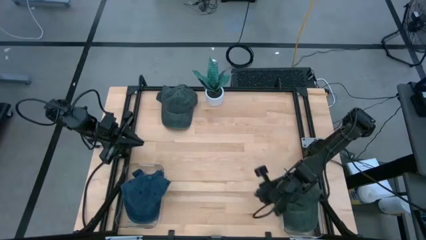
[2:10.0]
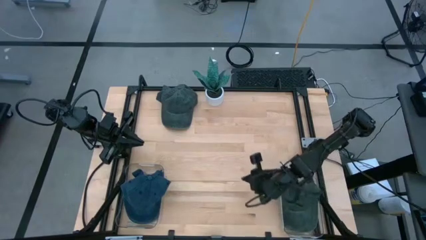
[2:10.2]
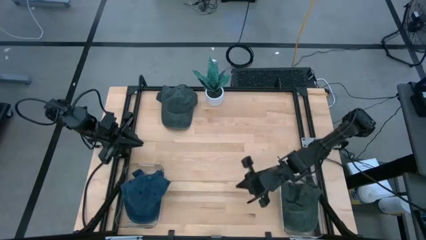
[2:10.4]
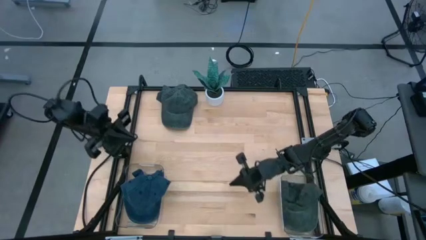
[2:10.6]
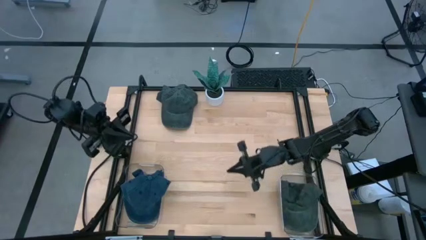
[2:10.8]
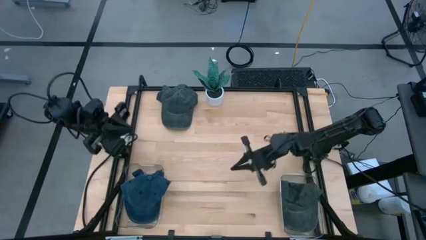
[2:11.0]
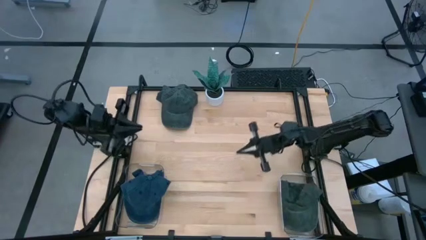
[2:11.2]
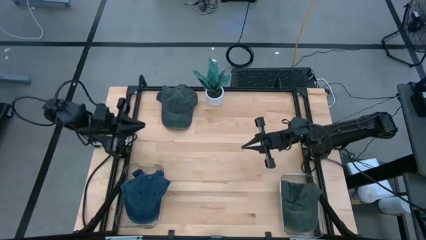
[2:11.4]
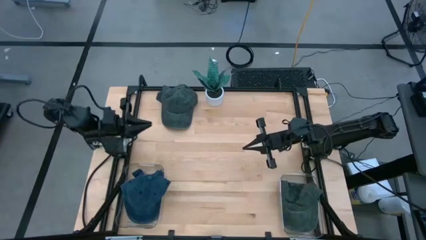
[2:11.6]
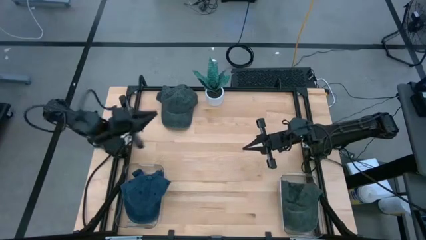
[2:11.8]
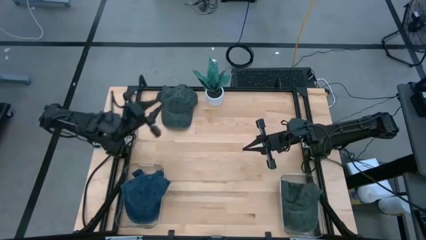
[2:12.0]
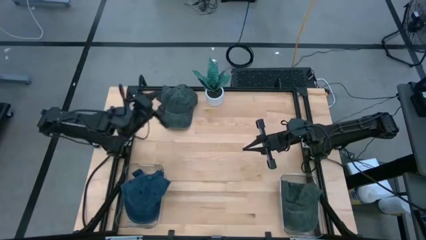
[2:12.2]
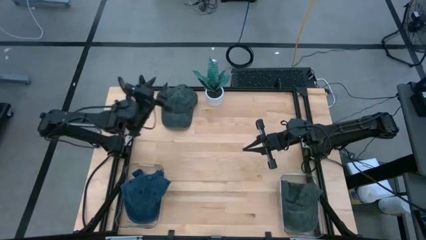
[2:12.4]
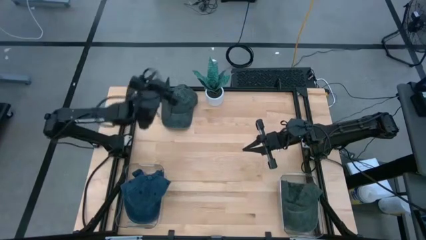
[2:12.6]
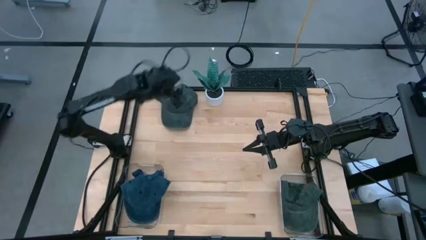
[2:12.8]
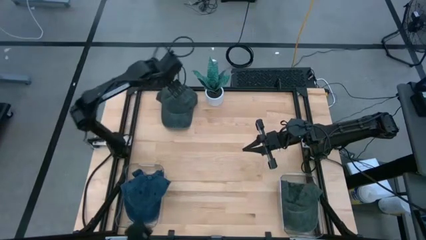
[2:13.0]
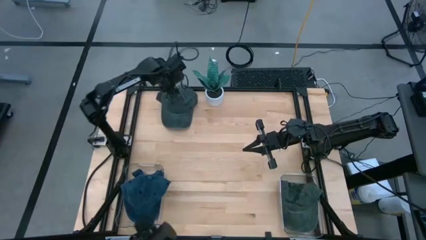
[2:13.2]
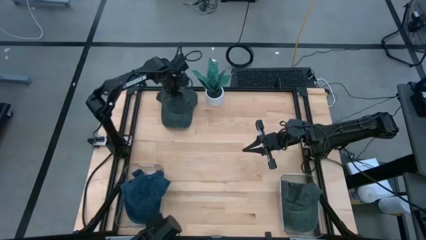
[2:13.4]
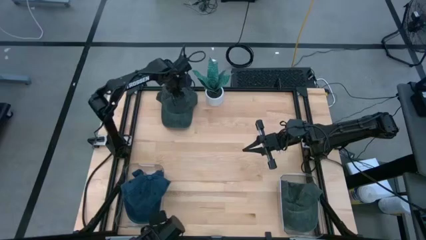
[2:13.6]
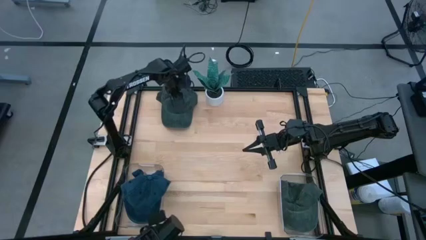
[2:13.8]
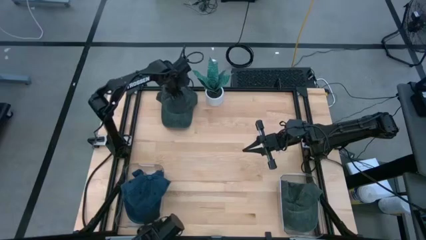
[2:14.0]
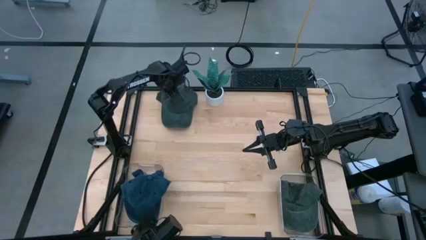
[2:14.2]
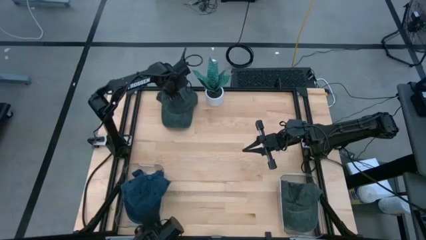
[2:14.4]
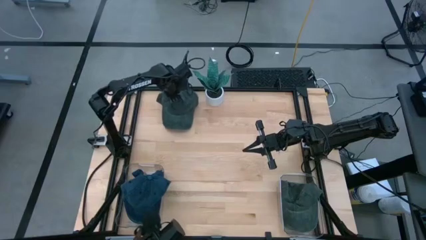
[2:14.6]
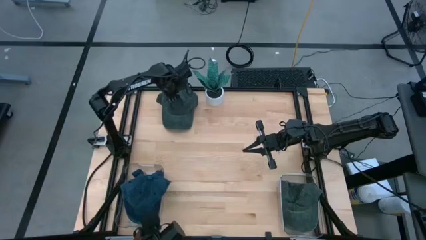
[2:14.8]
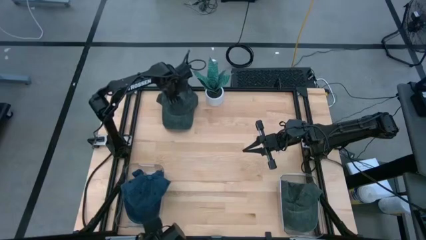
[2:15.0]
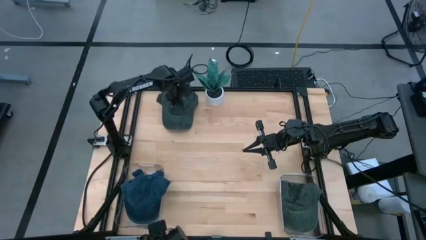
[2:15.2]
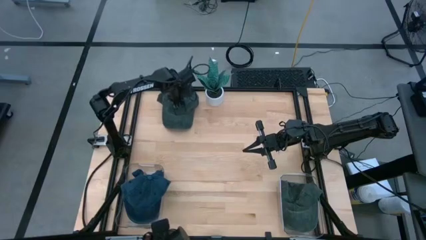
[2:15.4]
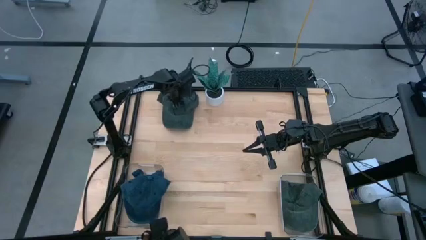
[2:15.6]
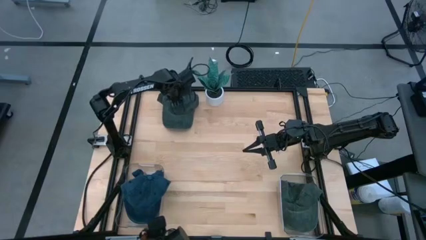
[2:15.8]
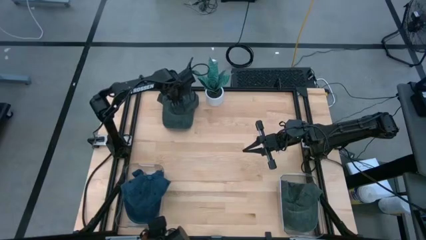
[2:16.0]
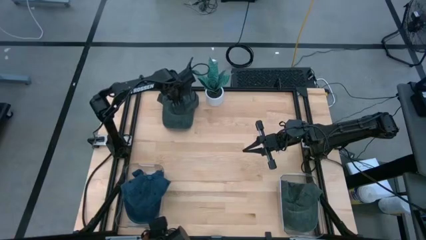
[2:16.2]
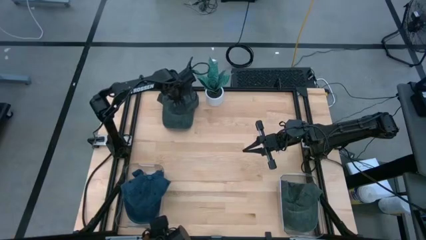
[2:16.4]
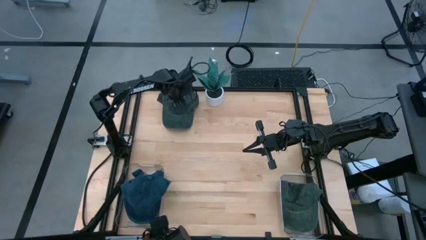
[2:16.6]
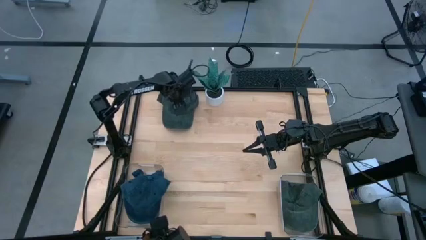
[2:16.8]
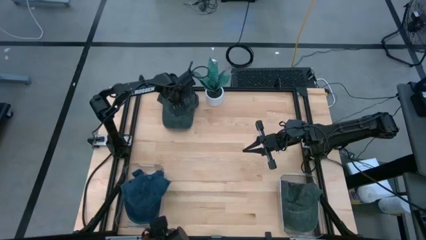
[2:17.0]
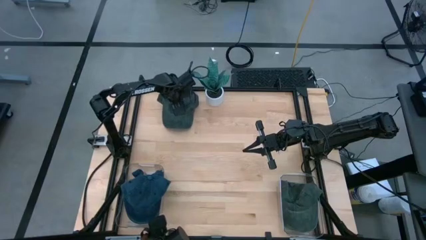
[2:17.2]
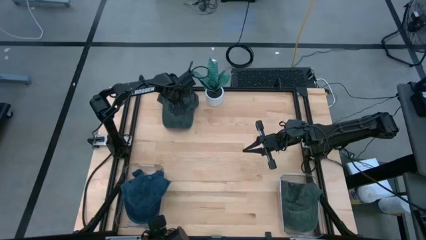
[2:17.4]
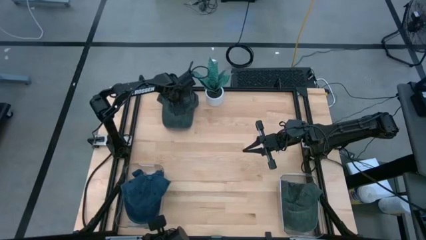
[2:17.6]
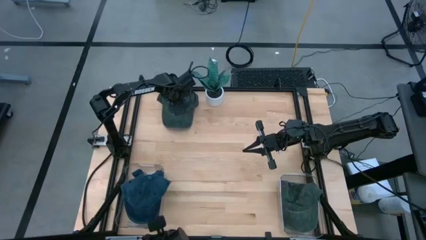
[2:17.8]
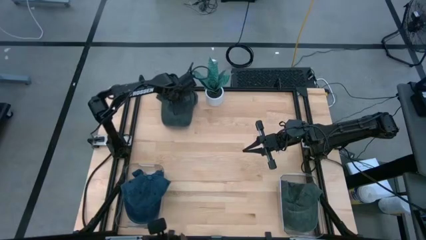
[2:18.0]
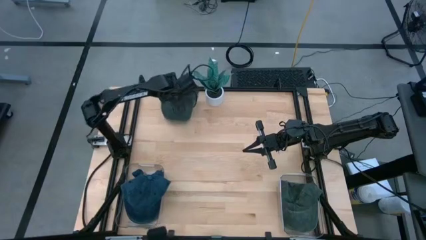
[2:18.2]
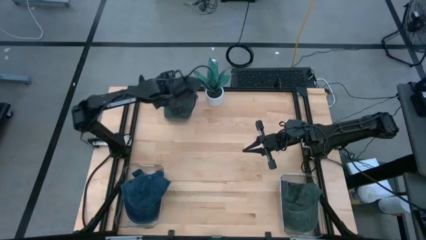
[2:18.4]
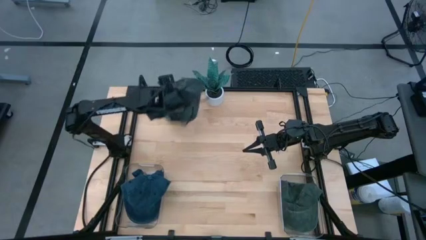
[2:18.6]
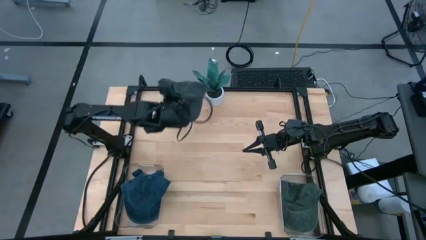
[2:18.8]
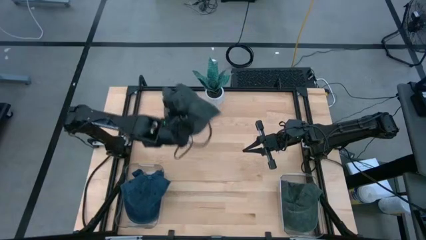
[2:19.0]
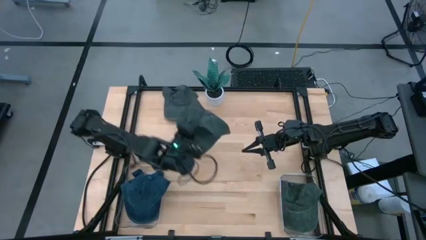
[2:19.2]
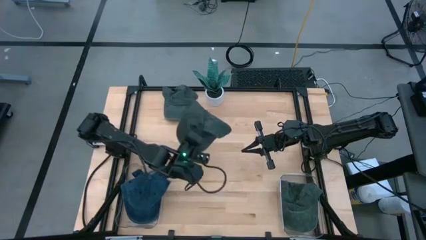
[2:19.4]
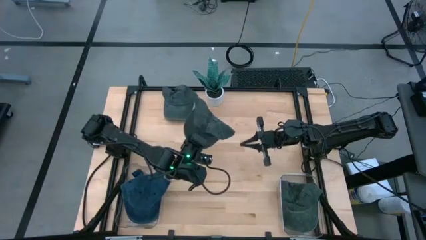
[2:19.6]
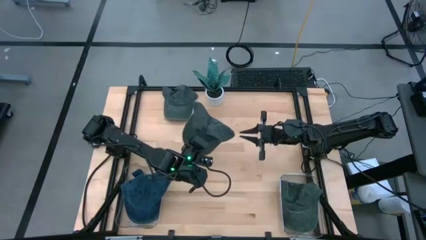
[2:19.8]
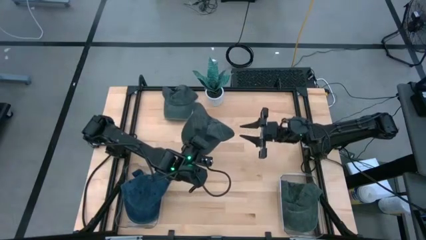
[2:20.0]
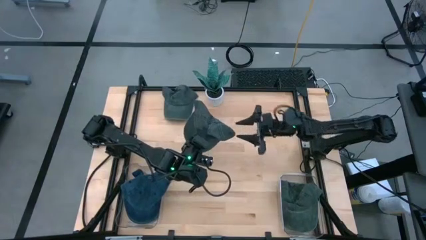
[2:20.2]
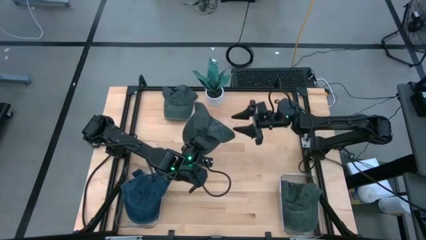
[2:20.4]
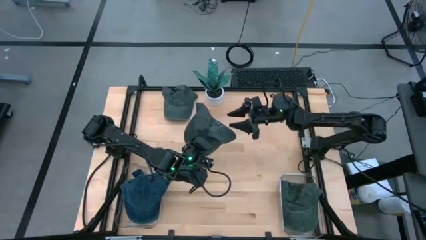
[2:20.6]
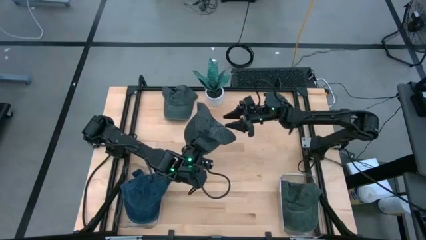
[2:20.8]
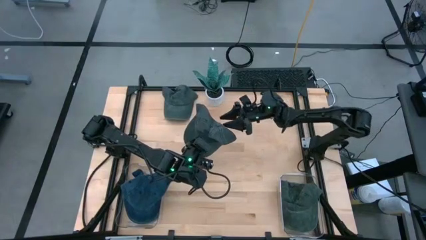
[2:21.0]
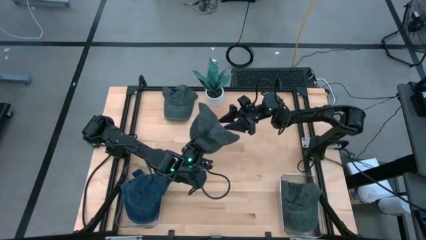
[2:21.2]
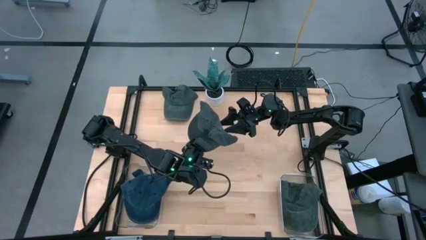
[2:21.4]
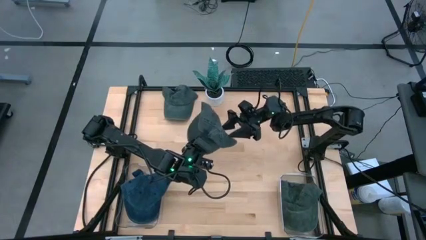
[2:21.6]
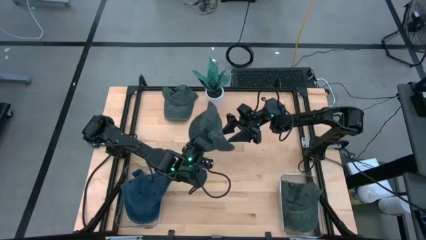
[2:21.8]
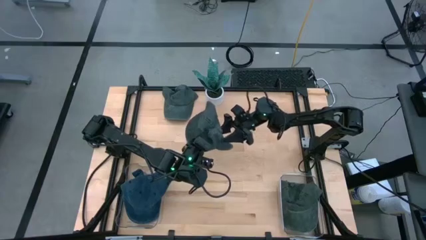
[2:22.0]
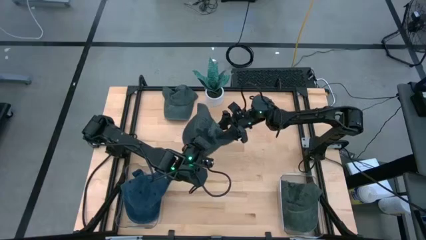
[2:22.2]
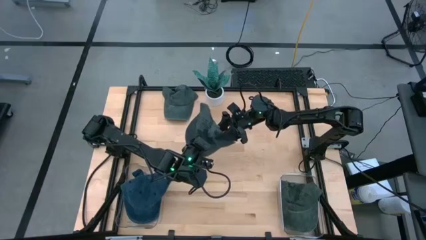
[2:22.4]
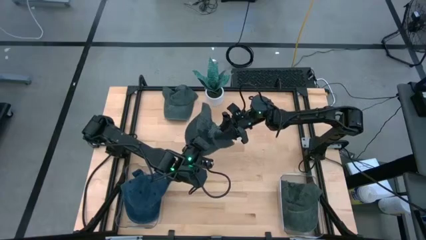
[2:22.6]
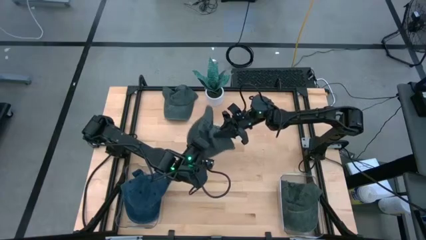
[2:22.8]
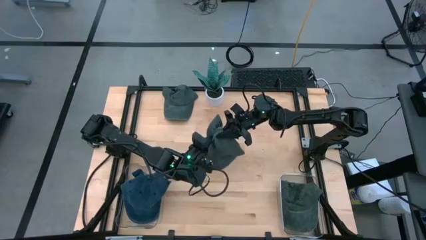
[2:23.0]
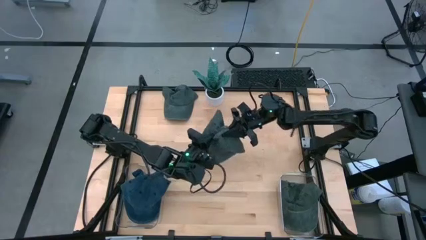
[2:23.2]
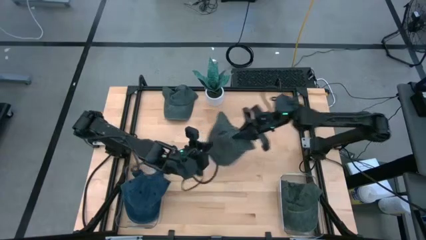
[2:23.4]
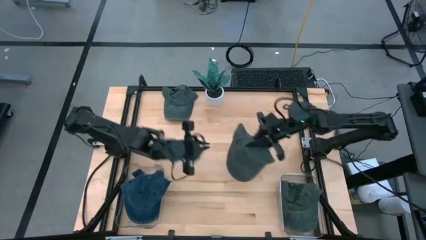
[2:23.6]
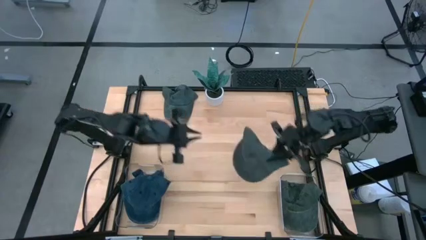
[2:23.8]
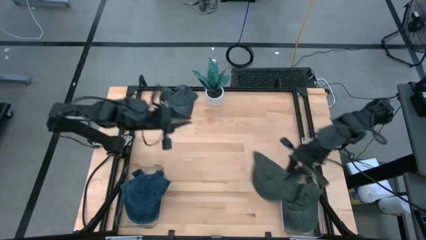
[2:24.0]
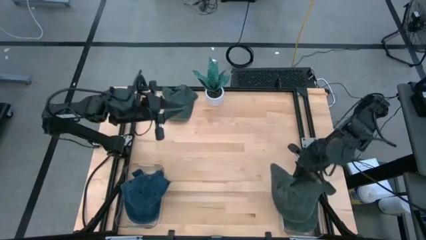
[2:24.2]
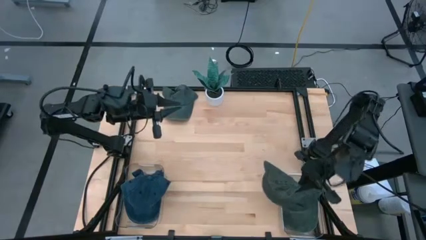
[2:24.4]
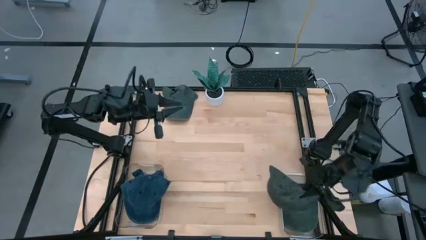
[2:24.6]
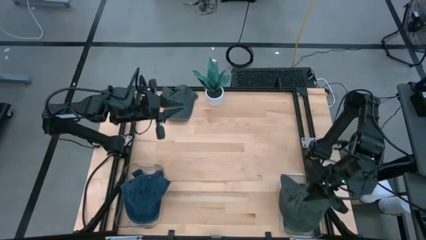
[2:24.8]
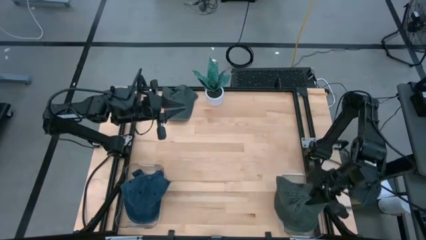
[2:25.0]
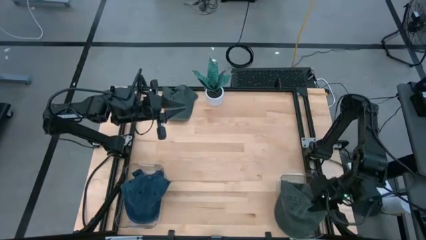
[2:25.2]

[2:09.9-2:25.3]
Task: Pick & Place hat
Put the top gray cap into the right transparent bin

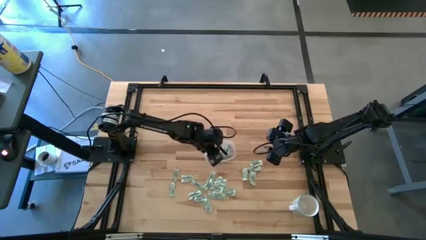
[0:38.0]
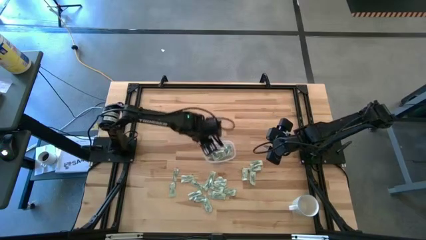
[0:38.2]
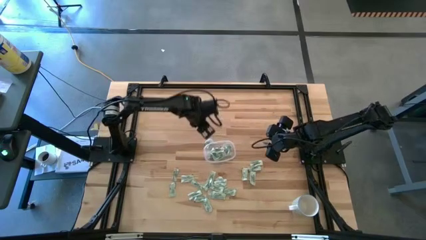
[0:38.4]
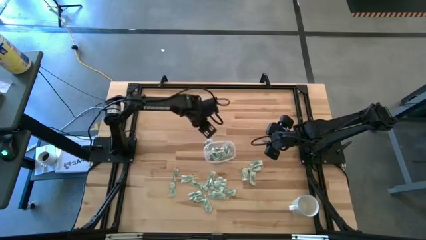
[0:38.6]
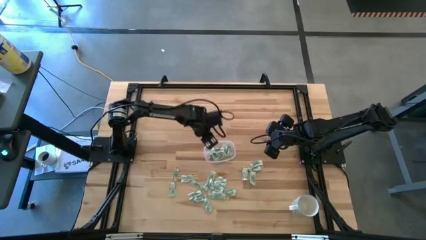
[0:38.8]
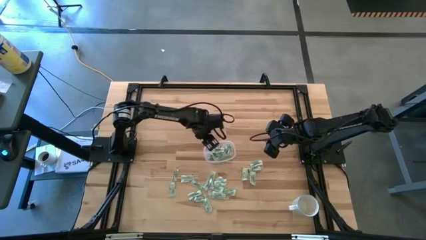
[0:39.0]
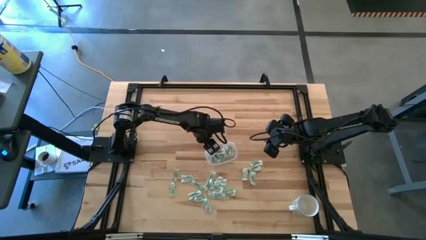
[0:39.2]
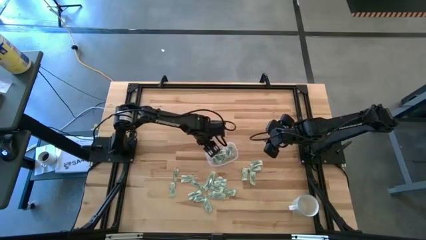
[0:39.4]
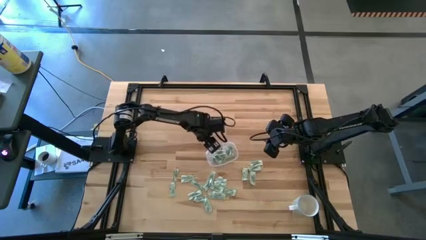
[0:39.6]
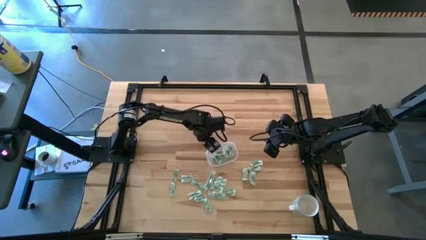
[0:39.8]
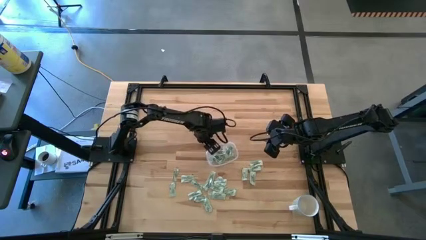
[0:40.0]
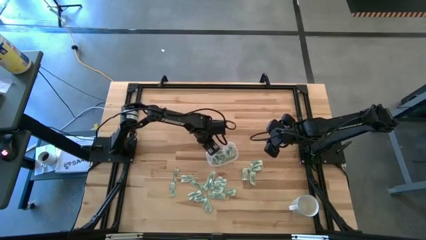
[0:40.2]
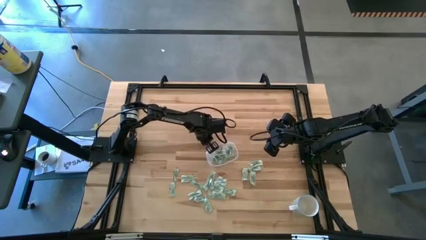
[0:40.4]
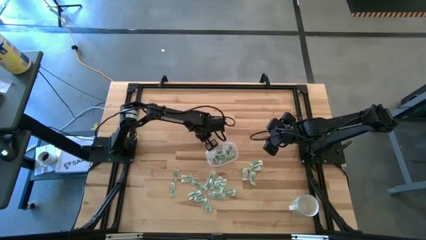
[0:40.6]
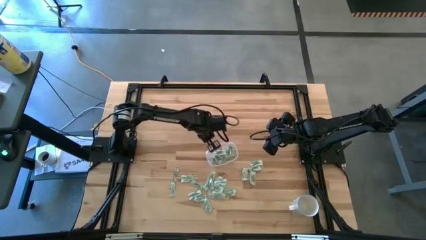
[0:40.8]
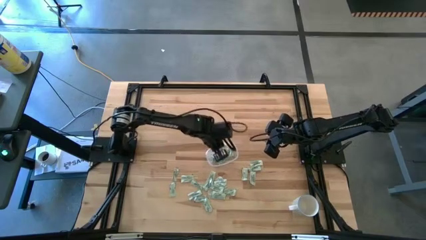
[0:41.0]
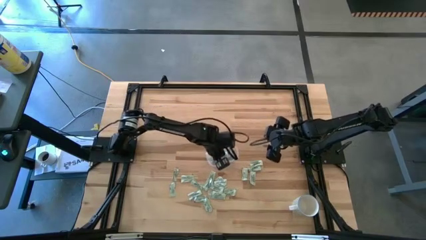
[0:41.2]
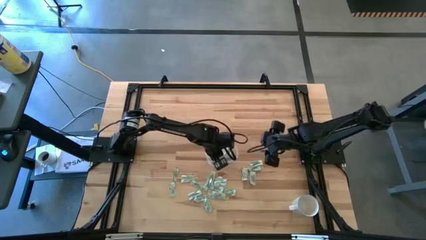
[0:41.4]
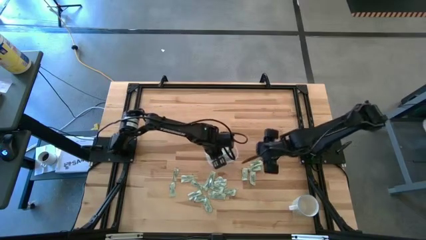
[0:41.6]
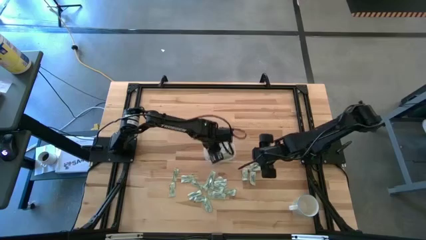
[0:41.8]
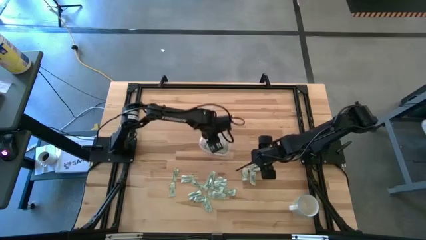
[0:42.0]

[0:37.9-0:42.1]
Task: Pick and place Stevia / Truvia into bins
Put the stevia packet into the transparent container
